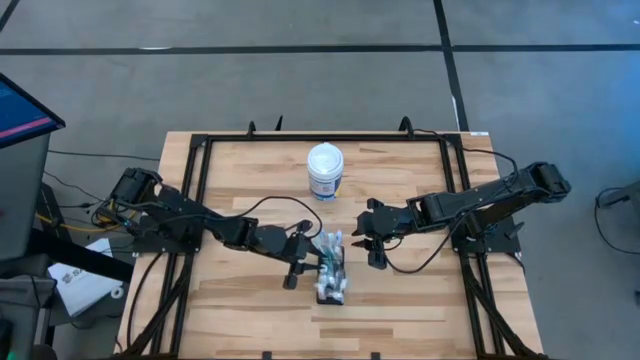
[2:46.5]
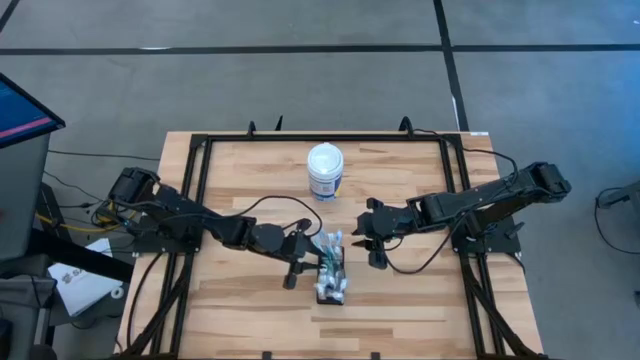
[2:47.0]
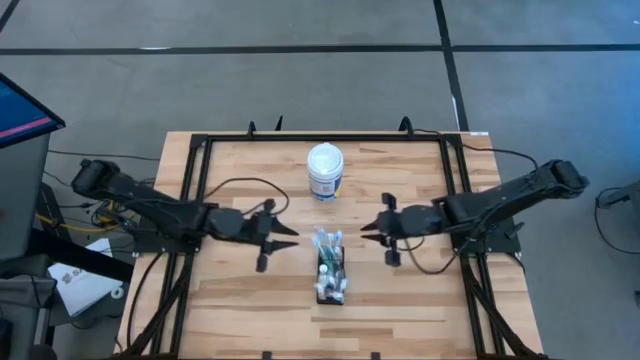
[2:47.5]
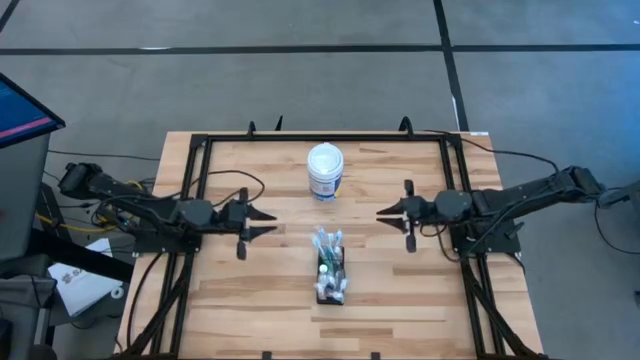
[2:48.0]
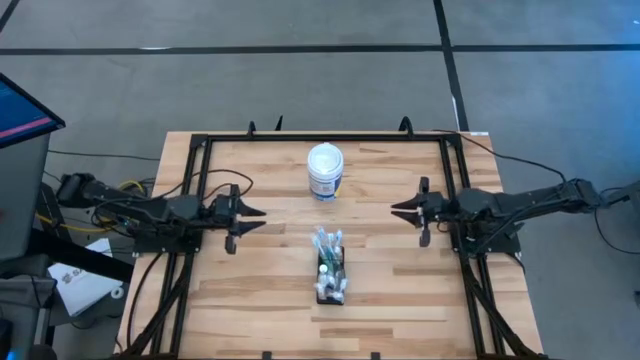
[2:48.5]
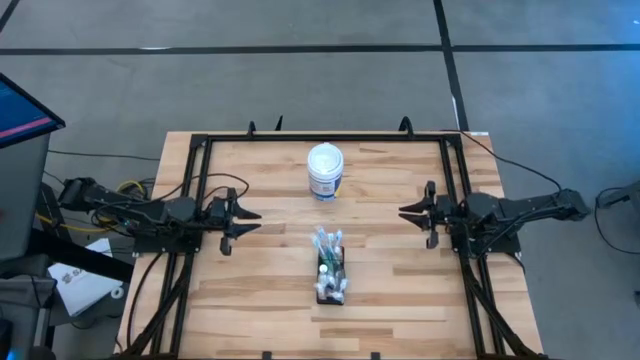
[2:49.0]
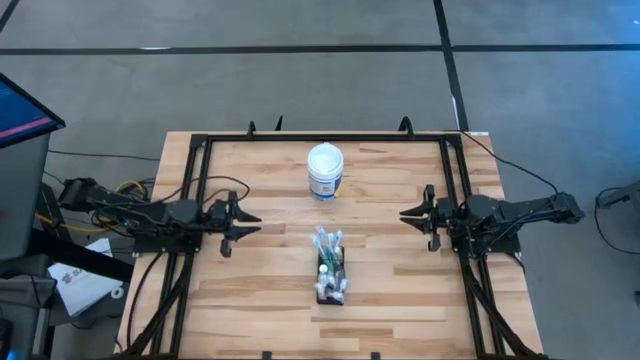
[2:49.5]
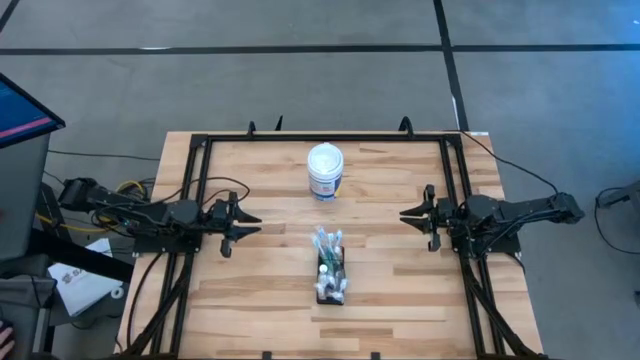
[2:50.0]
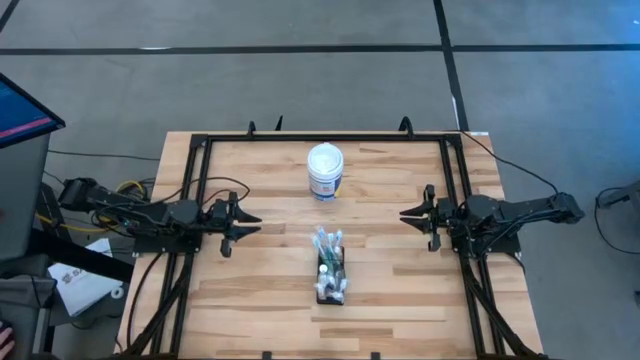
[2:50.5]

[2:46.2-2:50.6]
Task: Pick & Place toothbrushing station
Return to Home Position

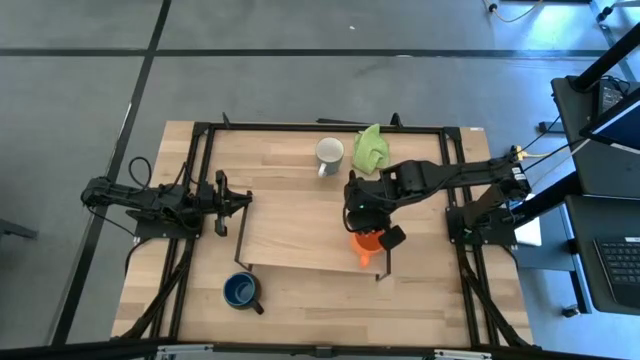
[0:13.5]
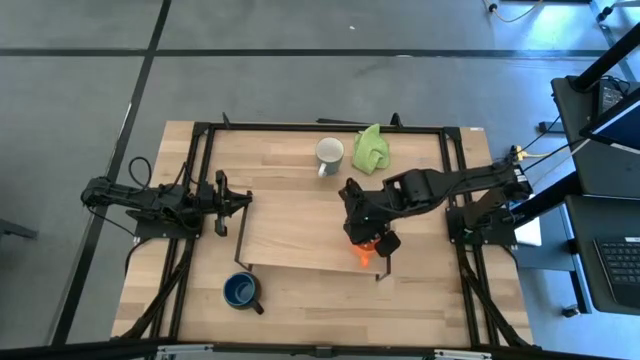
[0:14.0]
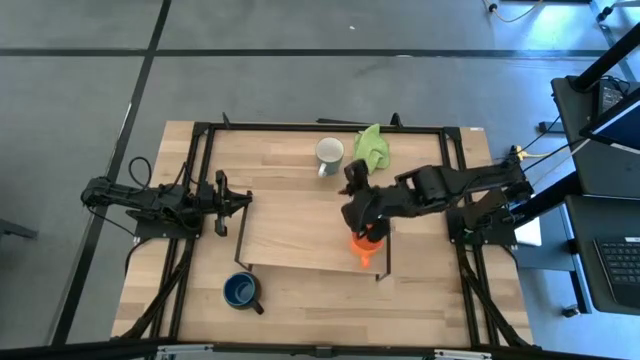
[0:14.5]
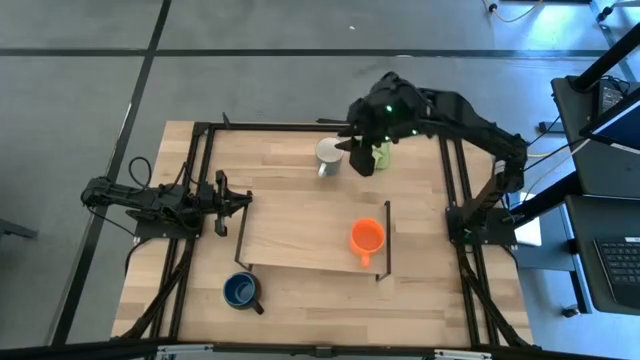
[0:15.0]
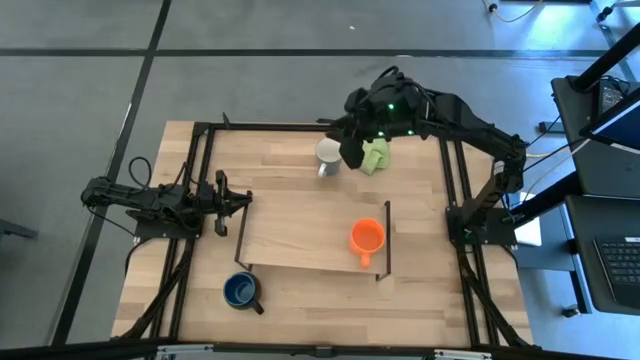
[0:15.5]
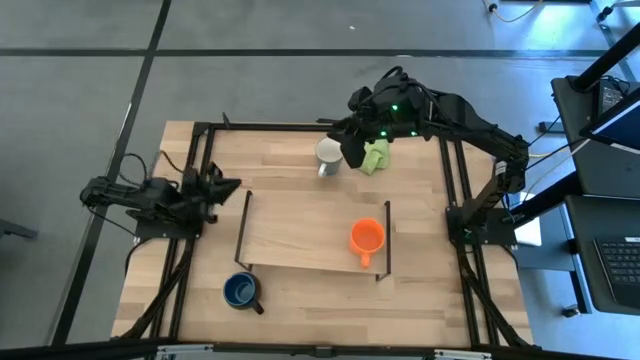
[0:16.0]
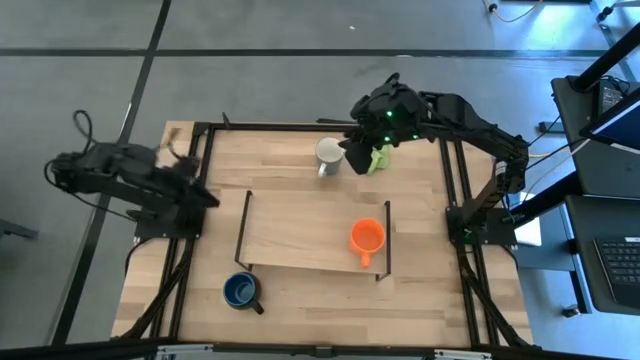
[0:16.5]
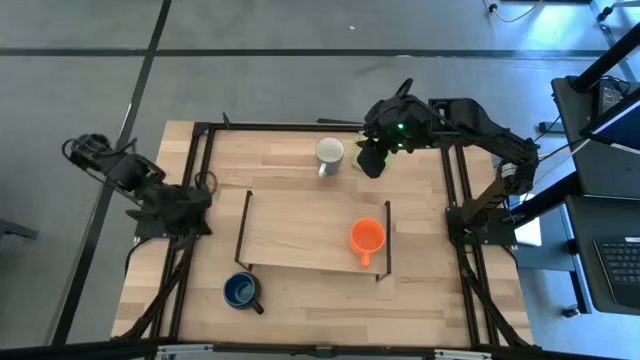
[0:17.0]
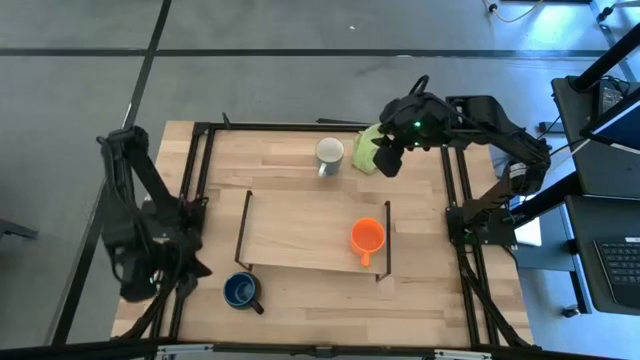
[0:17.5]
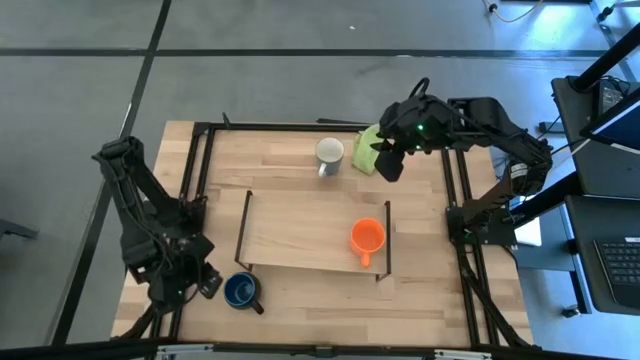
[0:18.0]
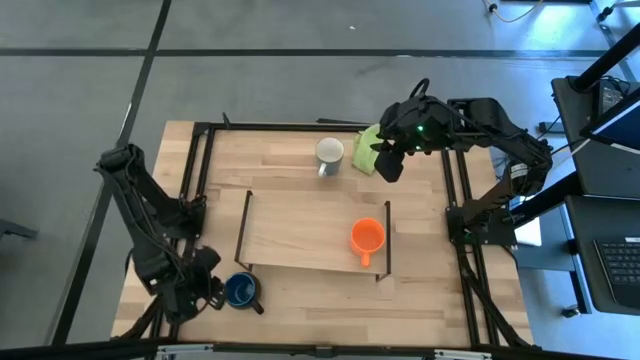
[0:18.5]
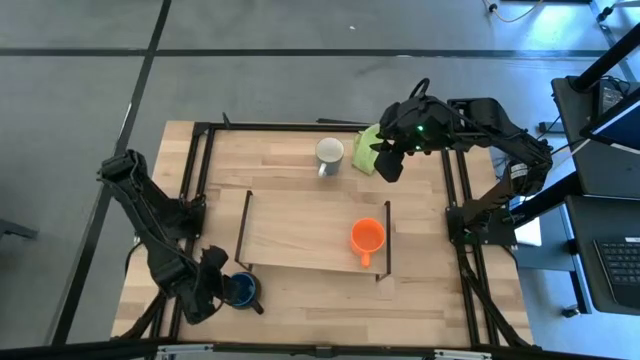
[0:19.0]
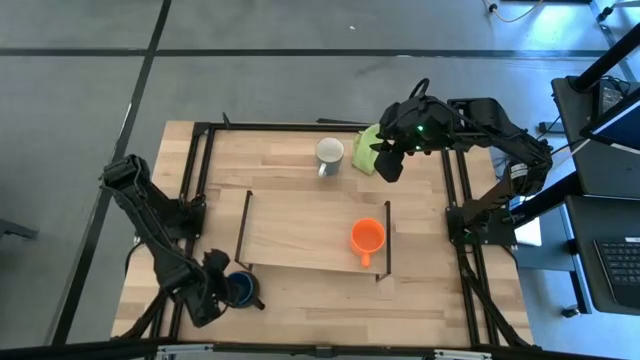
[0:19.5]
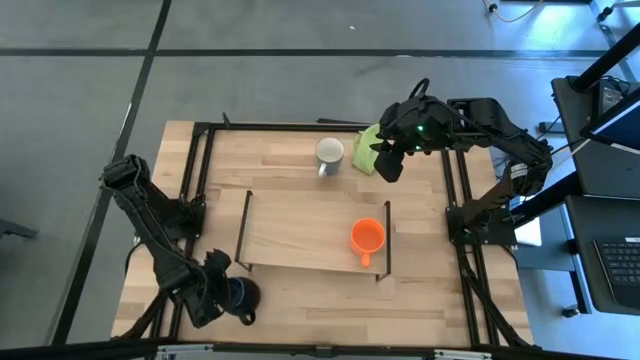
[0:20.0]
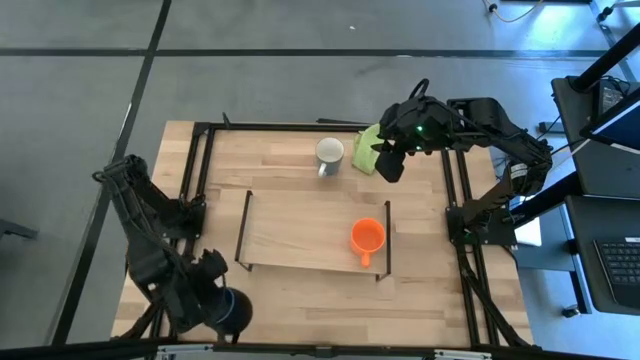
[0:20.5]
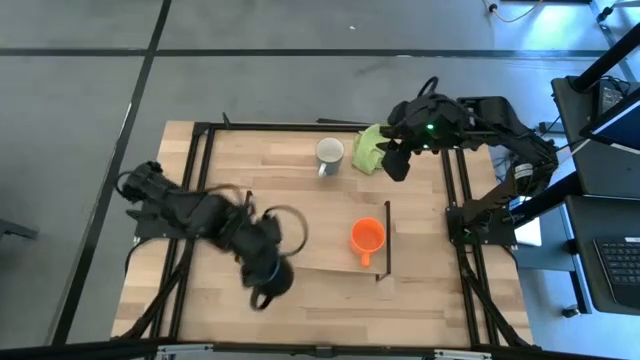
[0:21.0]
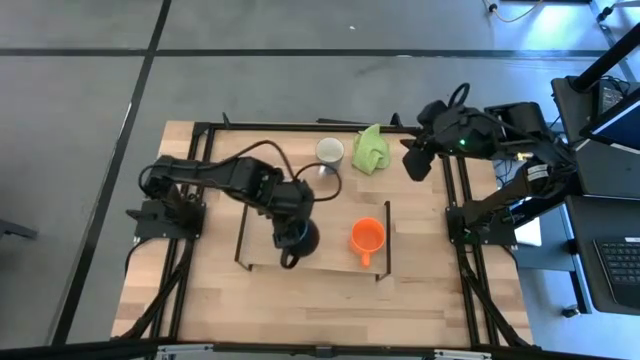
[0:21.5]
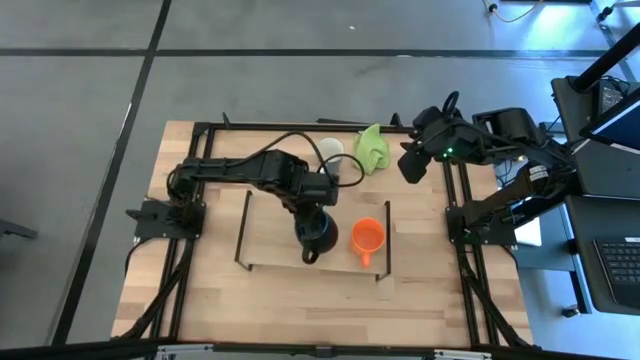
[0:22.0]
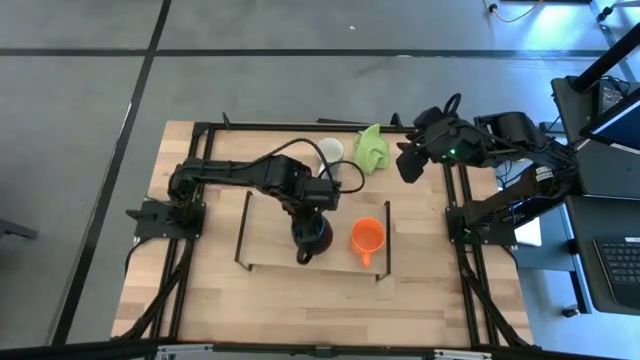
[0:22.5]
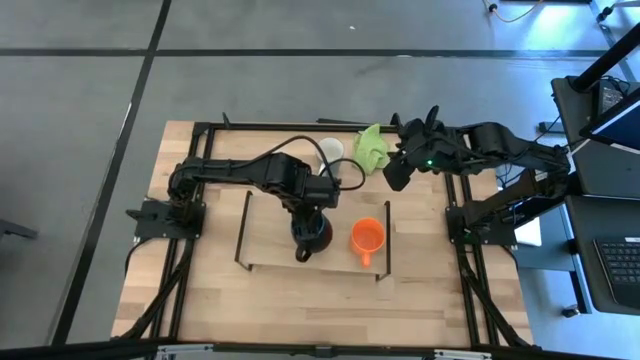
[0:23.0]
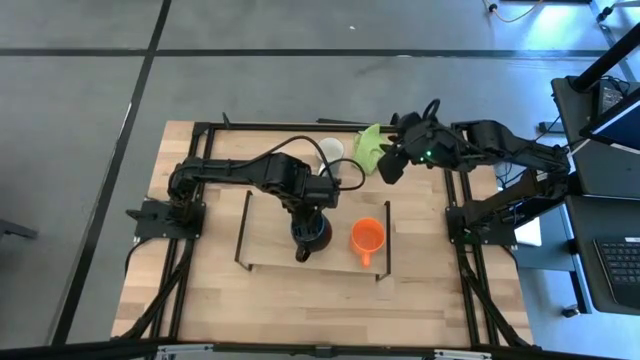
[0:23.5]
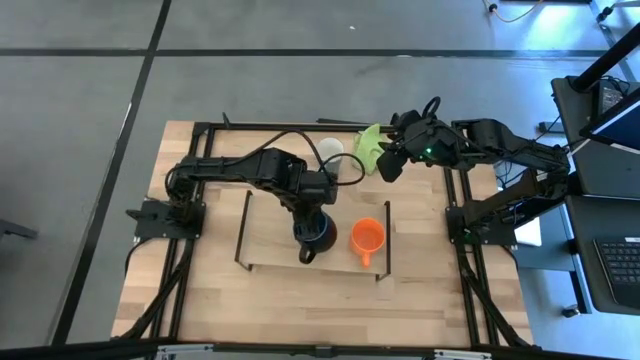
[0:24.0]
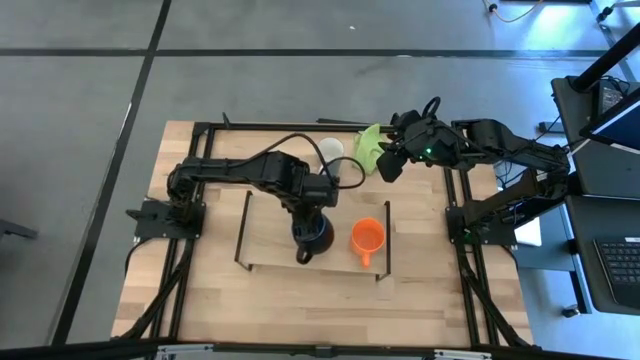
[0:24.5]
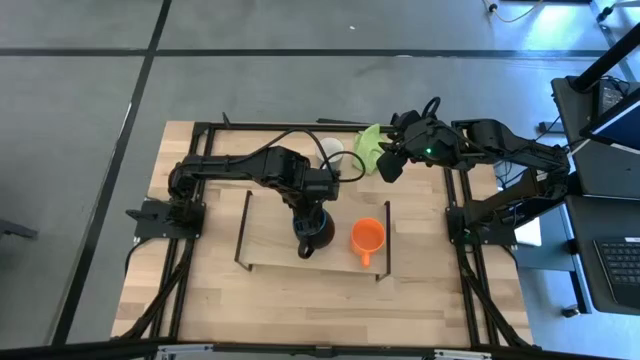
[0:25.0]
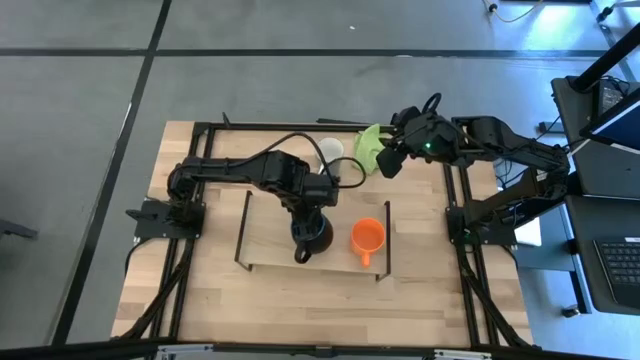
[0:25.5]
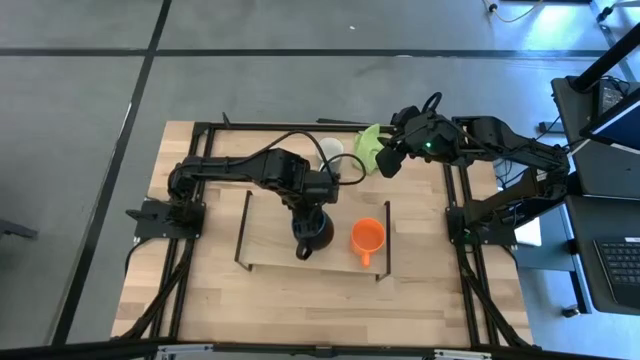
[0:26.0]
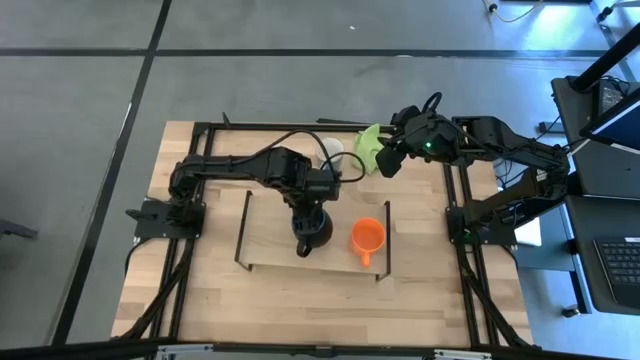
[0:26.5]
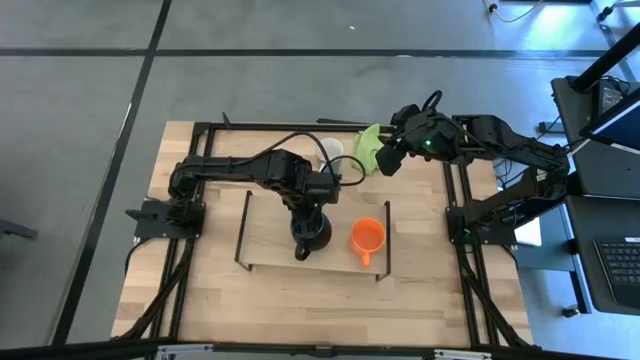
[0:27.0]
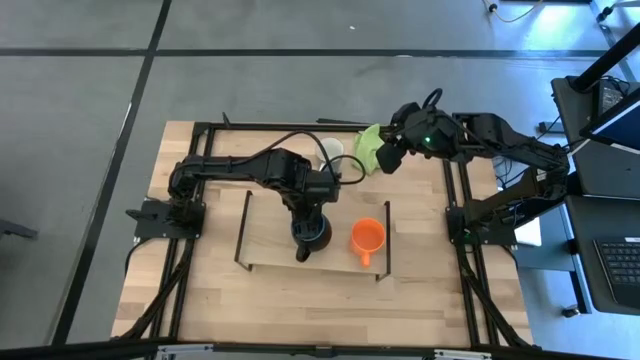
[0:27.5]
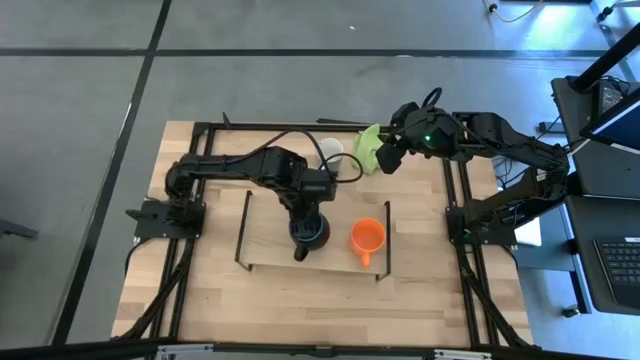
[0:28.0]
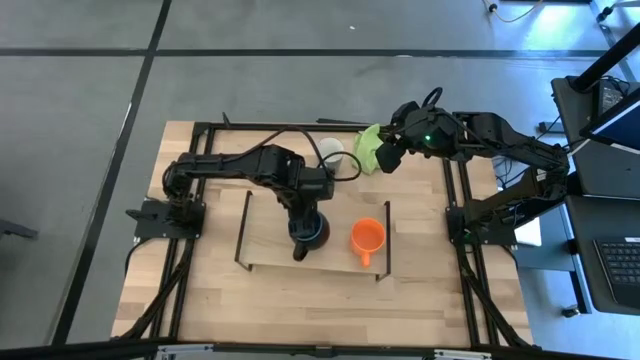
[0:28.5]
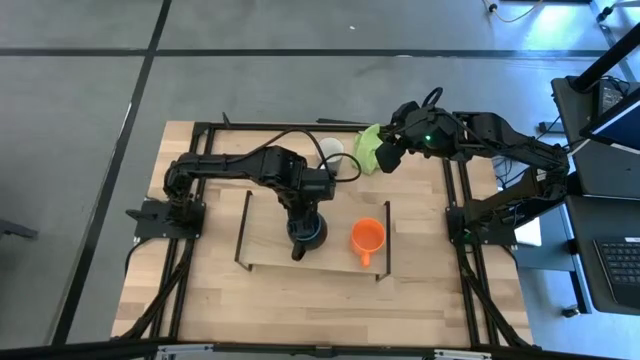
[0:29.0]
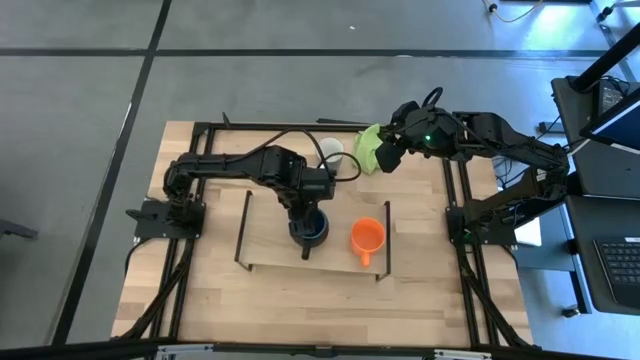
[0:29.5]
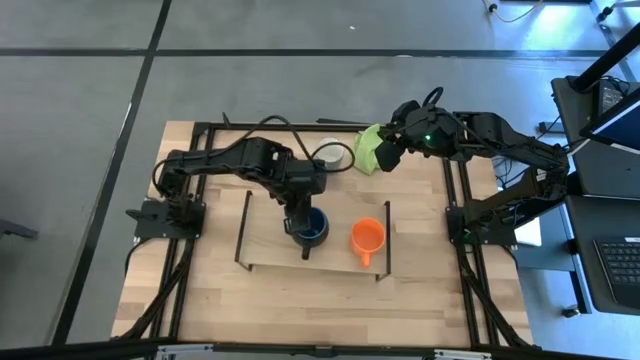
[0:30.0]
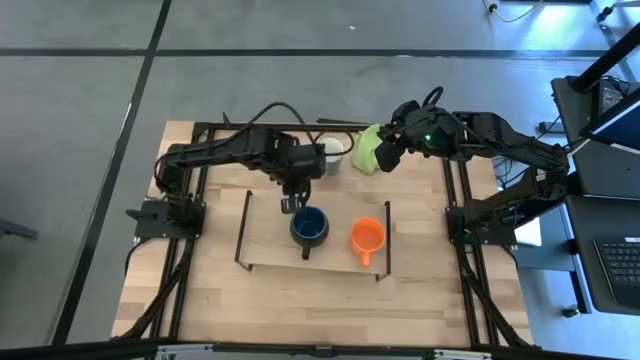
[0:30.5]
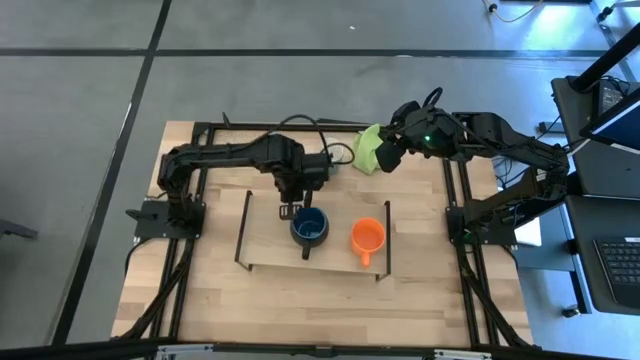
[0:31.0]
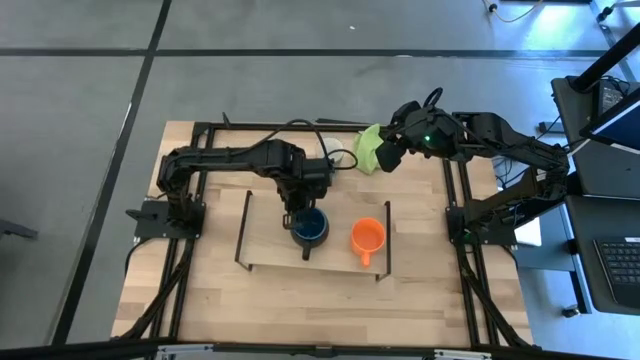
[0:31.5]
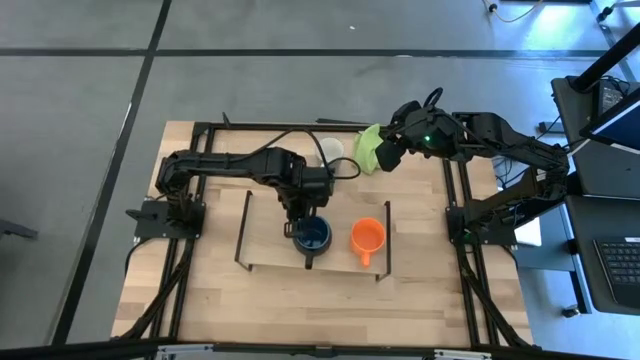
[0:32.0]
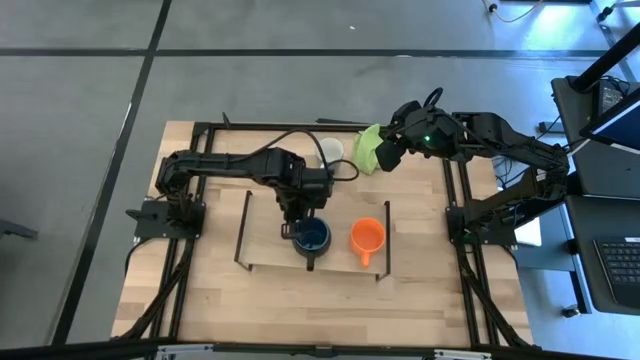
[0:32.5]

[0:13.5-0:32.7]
Task: Stack small to large cups/mugs on shelf
Put the black mugs on the shelf
